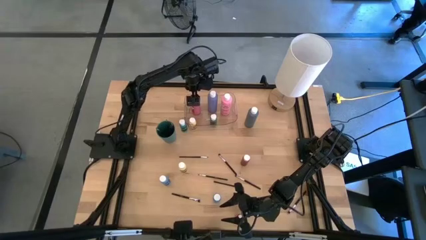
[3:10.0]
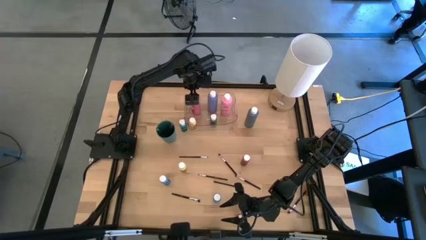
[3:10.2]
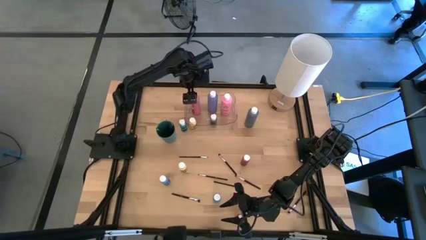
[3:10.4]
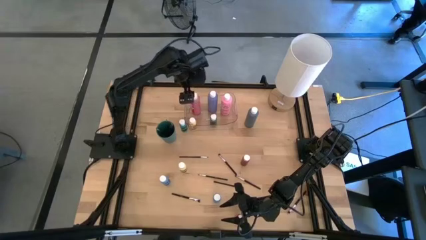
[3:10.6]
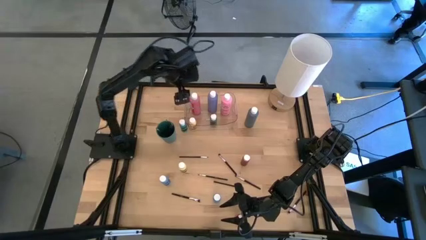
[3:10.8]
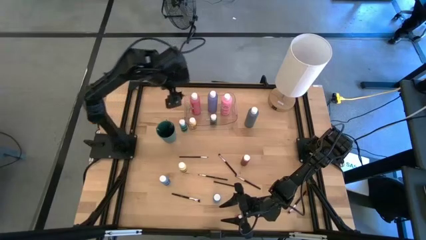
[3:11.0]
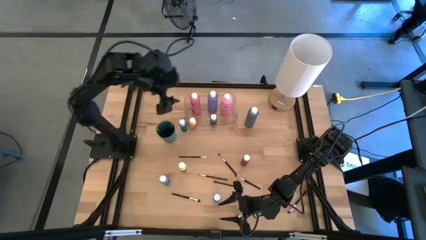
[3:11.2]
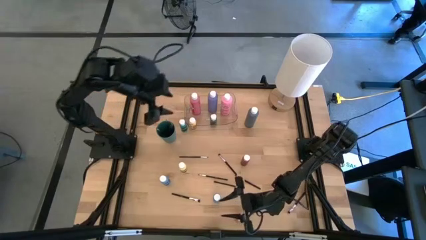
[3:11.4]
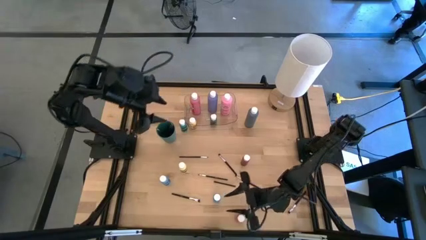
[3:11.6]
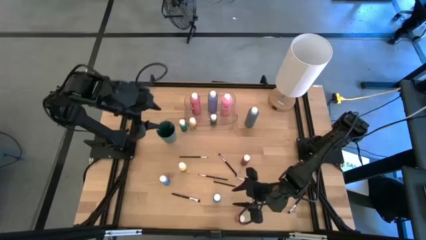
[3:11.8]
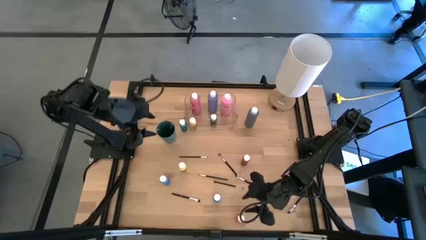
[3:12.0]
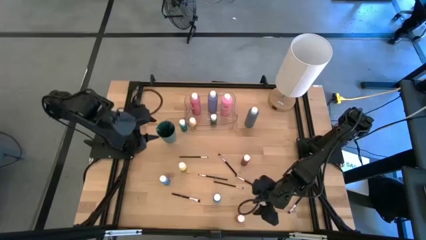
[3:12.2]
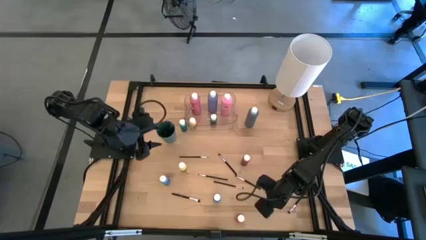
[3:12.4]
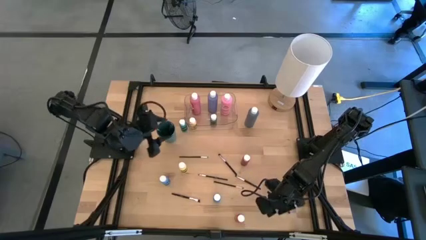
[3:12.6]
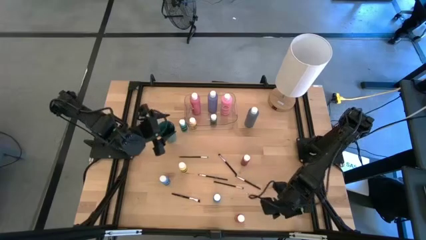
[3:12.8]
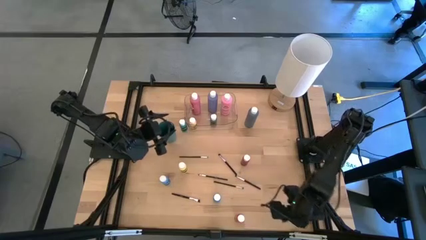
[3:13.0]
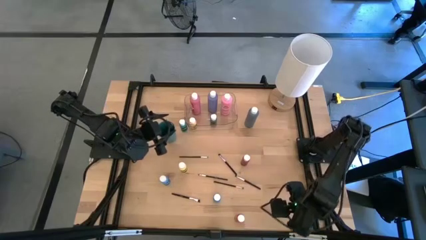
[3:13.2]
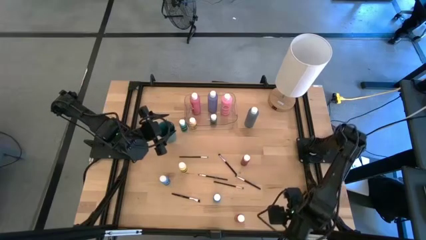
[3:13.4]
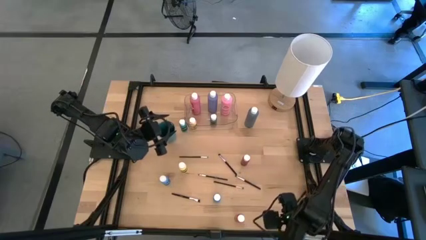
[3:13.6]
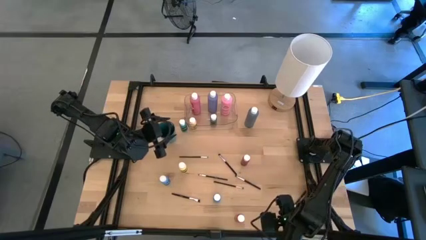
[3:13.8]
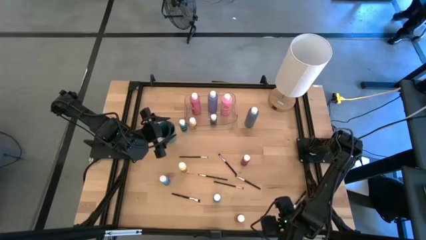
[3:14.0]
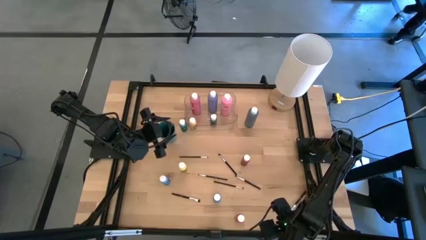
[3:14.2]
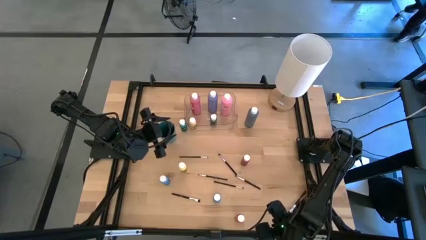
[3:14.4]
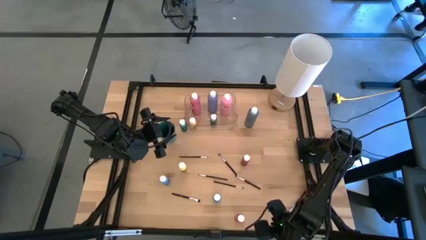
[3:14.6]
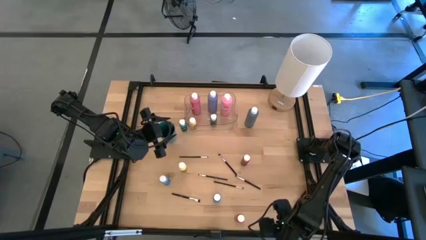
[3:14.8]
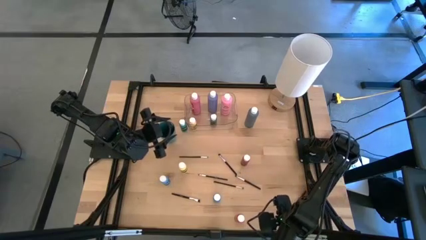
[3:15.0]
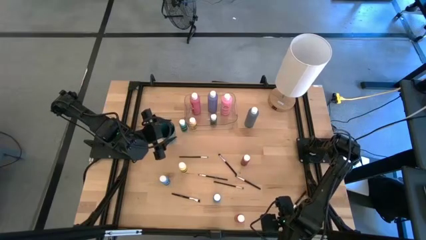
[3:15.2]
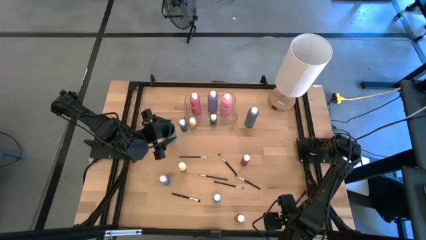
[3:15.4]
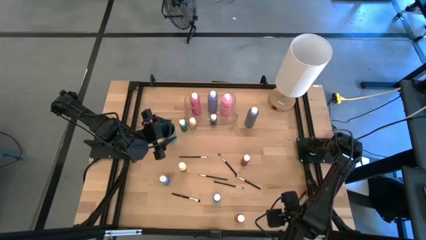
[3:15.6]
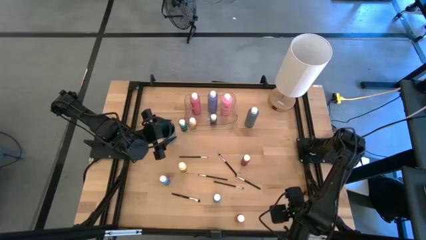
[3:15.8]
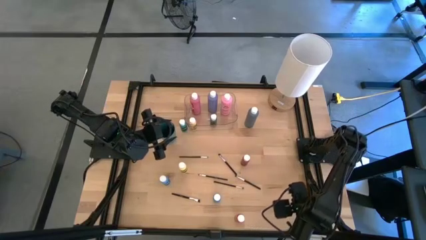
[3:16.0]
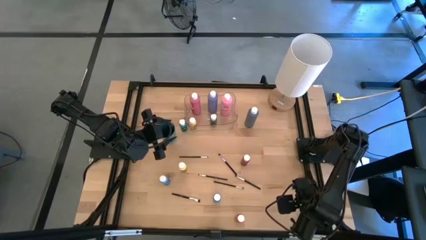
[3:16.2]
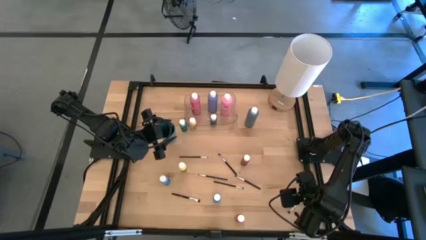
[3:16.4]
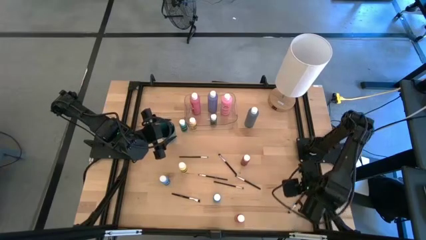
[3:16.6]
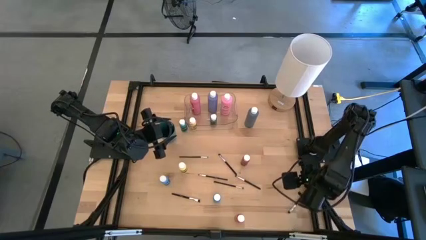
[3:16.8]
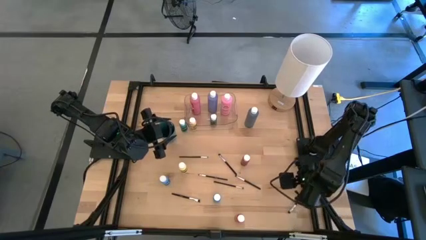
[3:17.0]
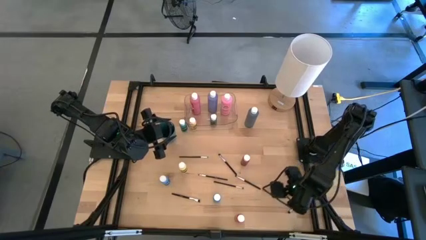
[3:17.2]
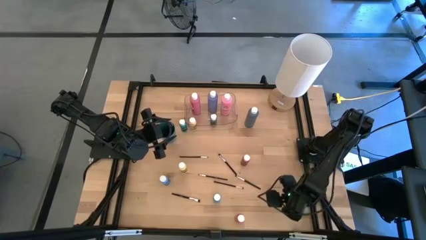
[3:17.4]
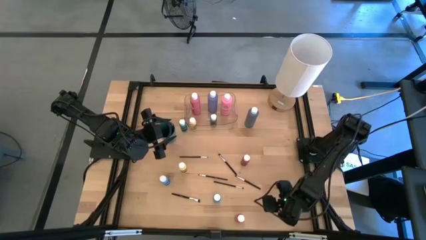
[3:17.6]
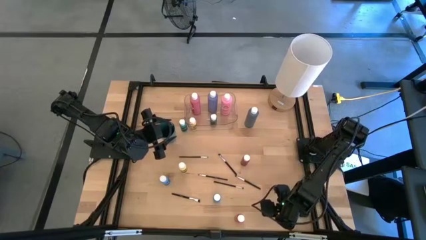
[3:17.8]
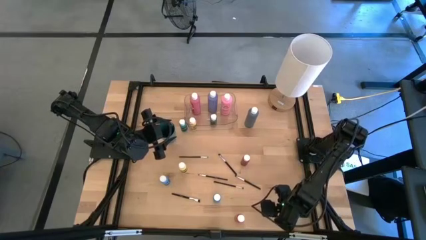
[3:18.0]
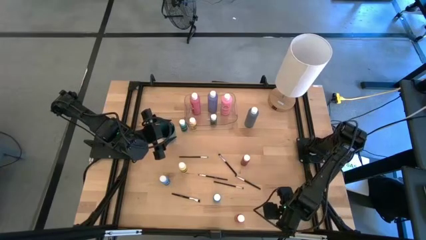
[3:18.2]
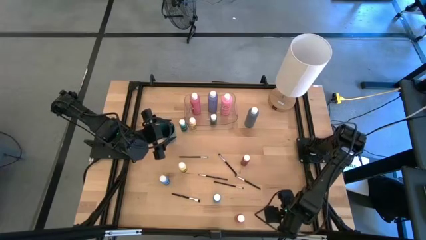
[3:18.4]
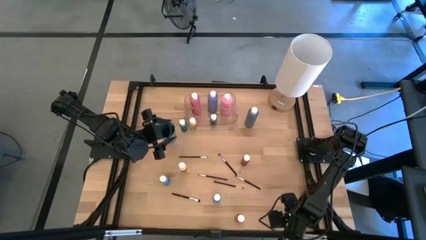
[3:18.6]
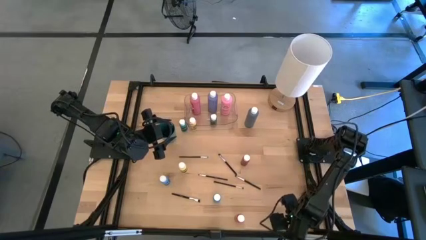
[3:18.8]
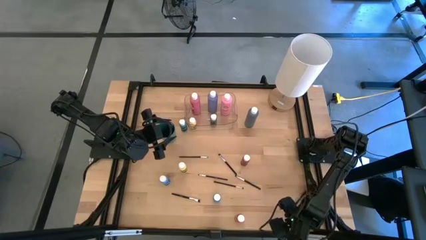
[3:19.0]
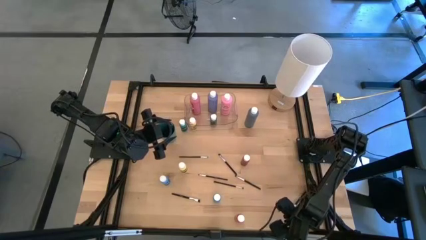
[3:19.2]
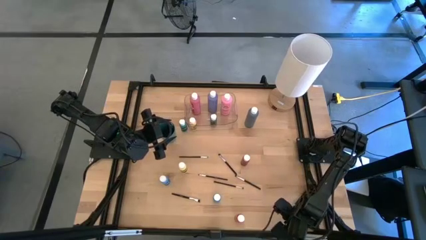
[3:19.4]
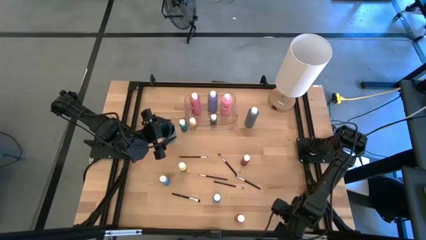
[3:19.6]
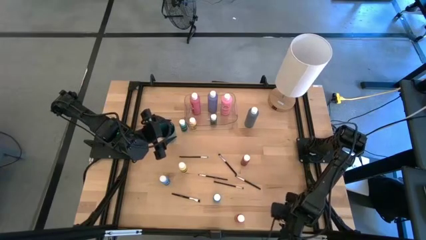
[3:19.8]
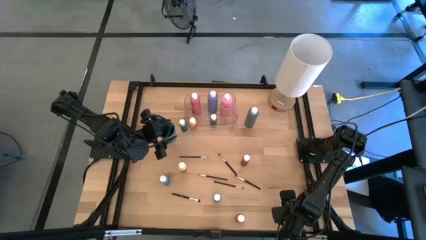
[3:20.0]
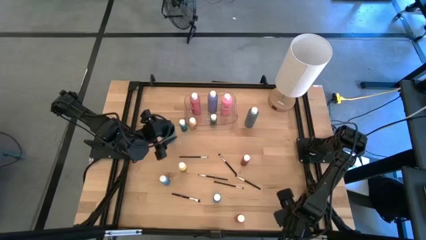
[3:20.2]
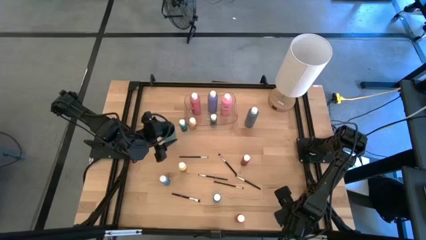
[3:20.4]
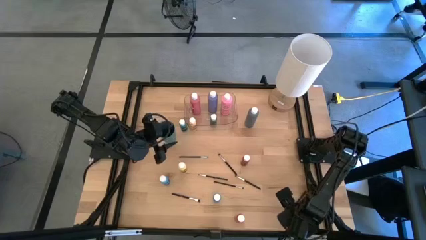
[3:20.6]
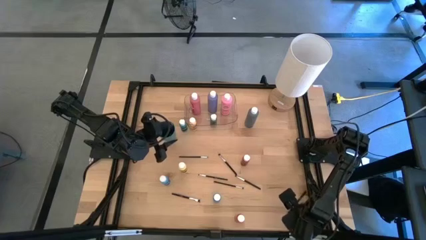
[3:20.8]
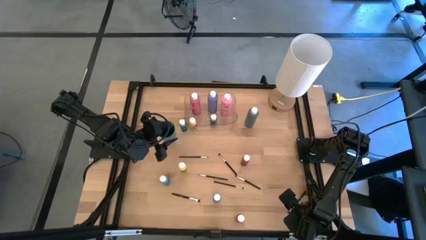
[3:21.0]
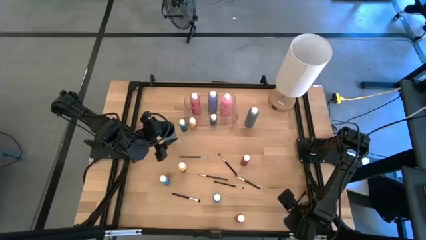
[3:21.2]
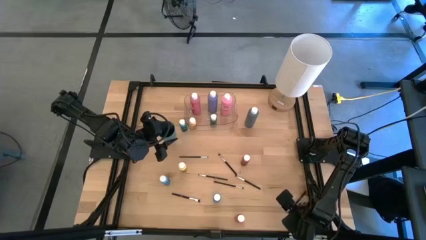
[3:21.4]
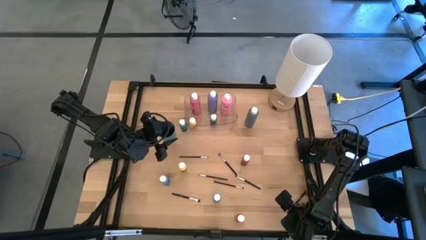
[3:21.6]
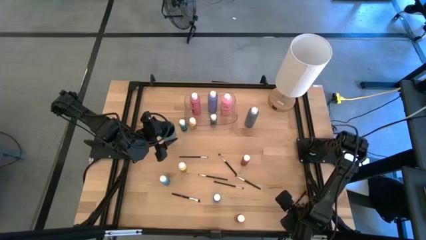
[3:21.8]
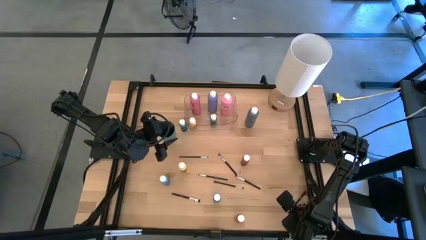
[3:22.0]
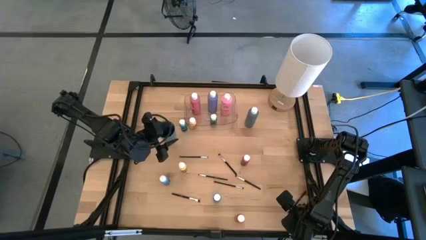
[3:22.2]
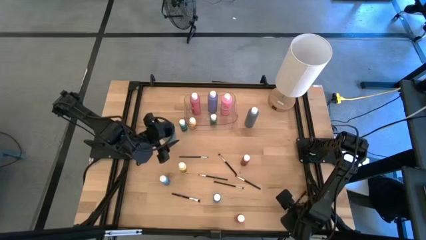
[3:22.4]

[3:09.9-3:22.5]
Task: Pick & Place Paint Supplies
Put the black paint brush into the green cup

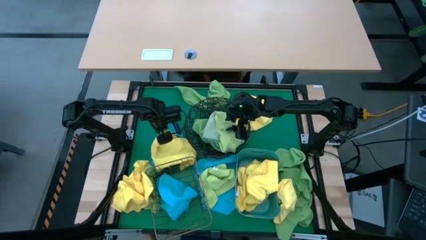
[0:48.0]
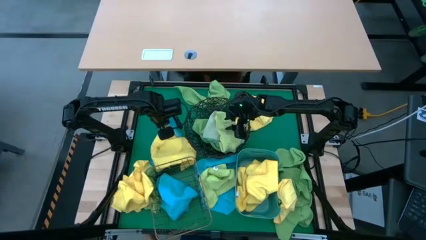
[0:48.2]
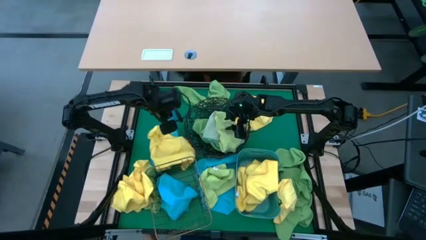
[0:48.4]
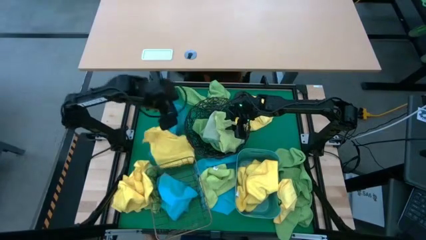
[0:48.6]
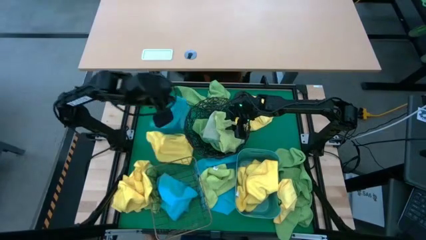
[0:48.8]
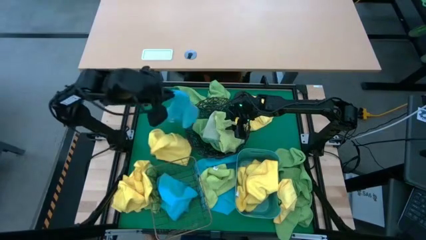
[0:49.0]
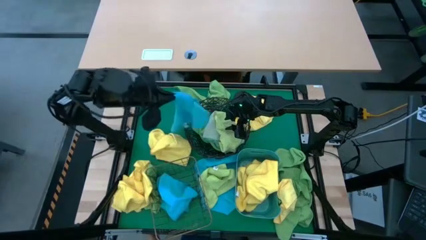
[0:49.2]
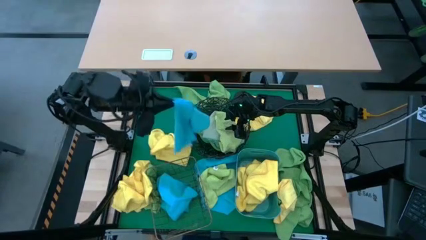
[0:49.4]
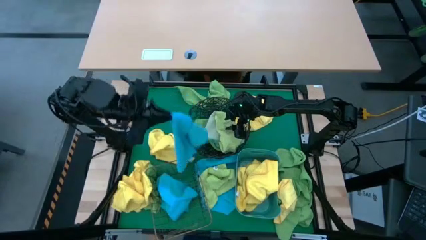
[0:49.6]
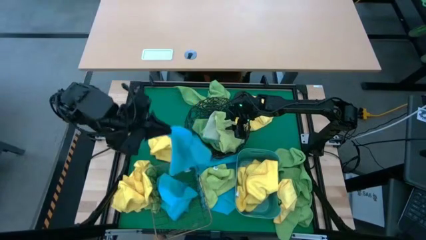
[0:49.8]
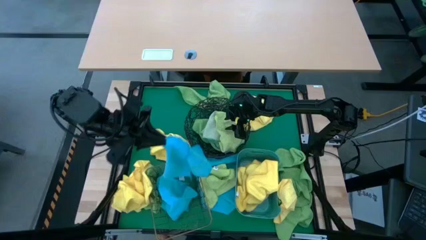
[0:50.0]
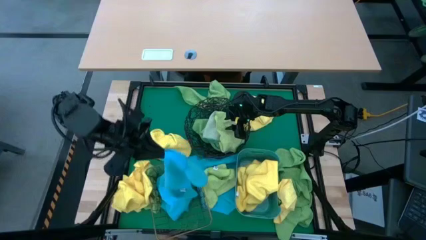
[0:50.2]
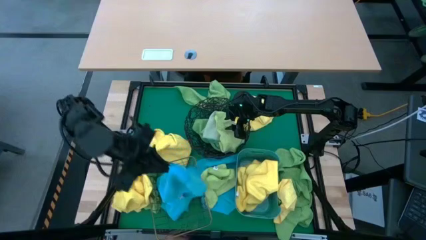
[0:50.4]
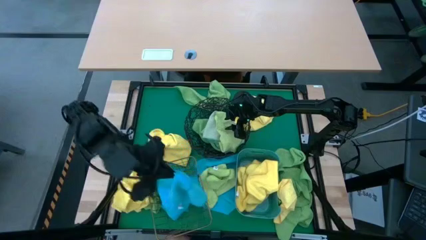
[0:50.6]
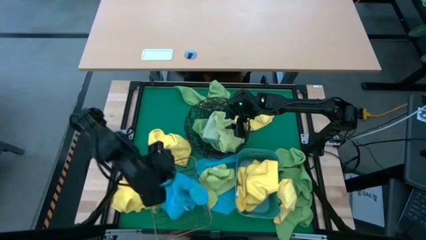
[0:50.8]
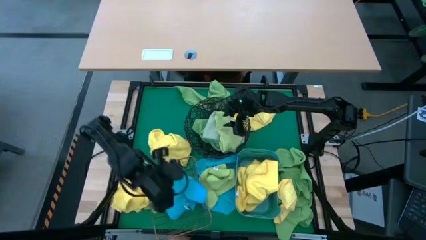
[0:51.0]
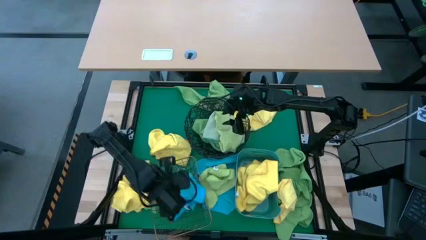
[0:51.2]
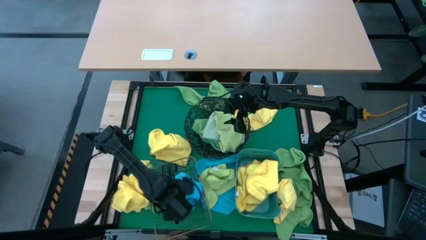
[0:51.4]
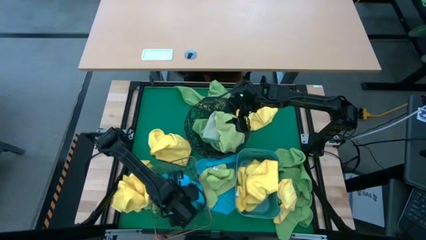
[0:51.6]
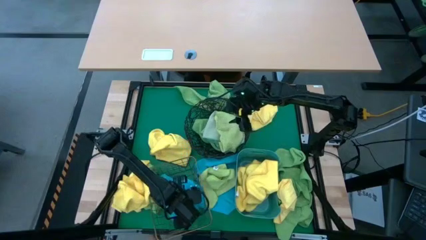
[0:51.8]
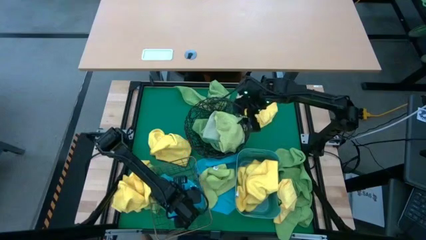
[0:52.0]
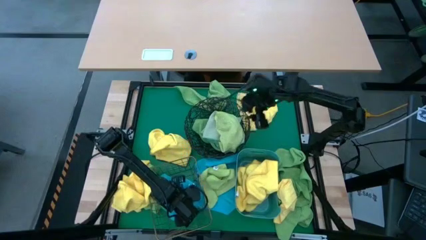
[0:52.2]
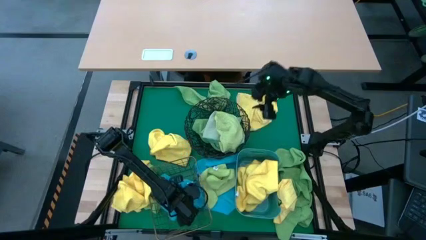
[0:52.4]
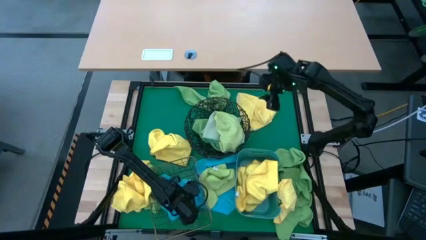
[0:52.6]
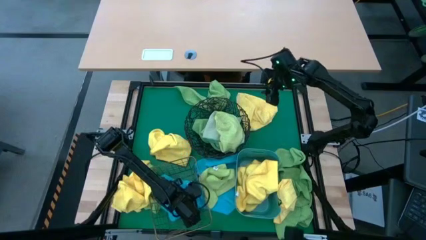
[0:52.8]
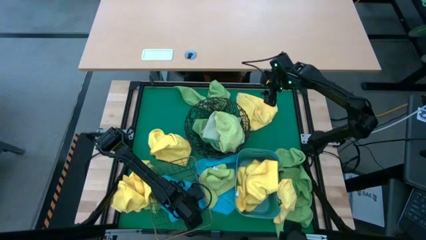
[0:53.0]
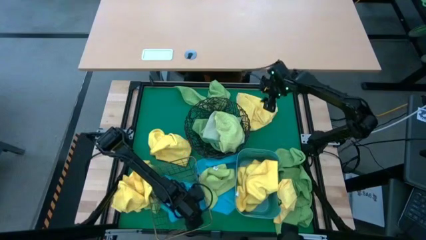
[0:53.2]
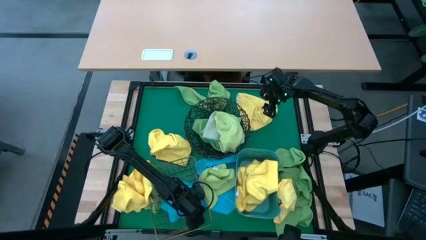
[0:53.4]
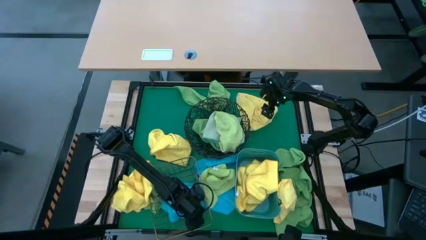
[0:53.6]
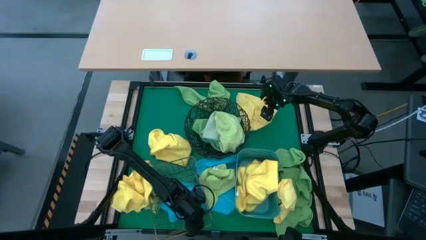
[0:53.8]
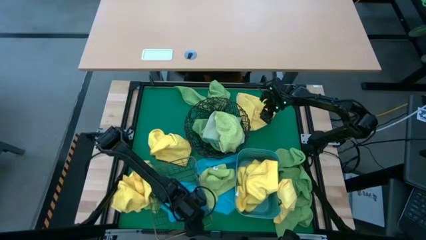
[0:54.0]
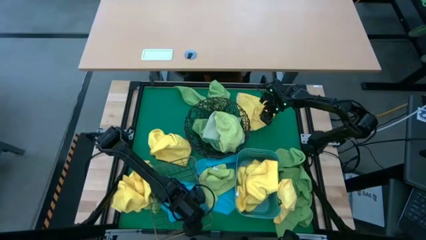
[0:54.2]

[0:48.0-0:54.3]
Task: Sort microfiber towel by color & place in baskets
Put the blue microfiber cloth into the wire basket
